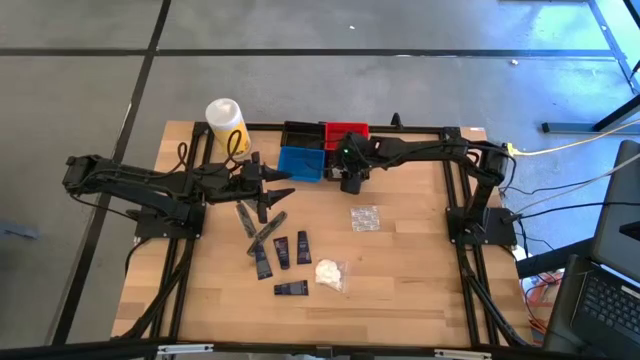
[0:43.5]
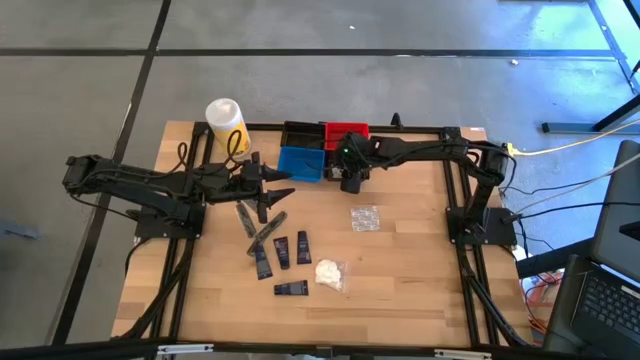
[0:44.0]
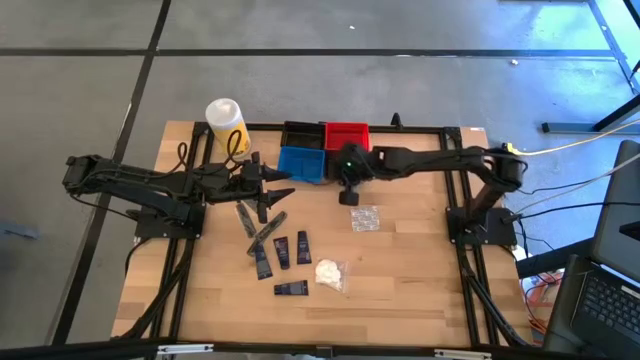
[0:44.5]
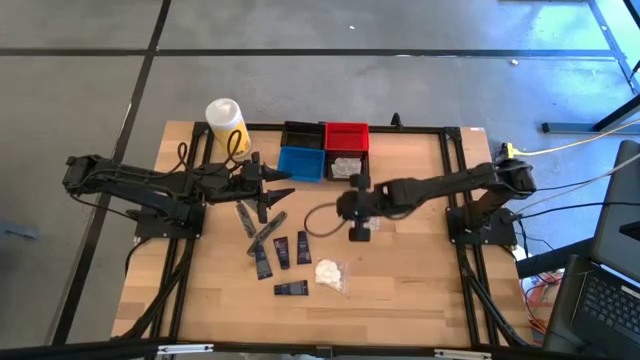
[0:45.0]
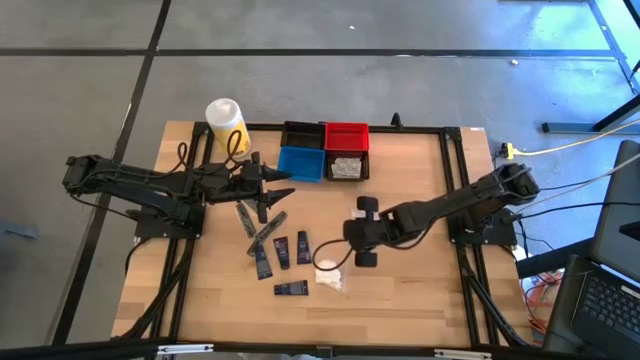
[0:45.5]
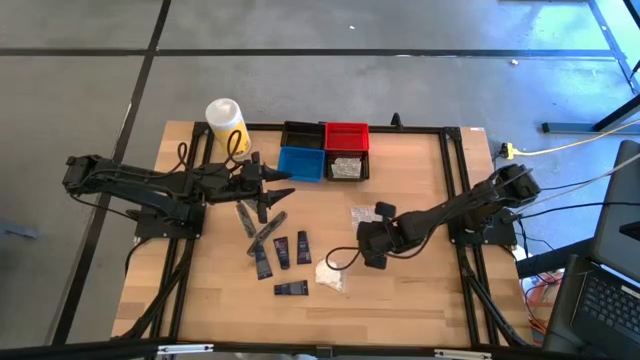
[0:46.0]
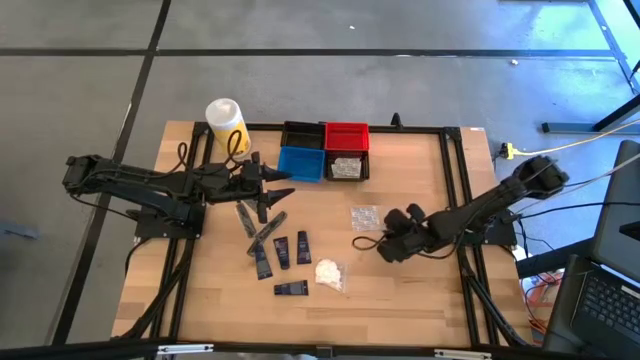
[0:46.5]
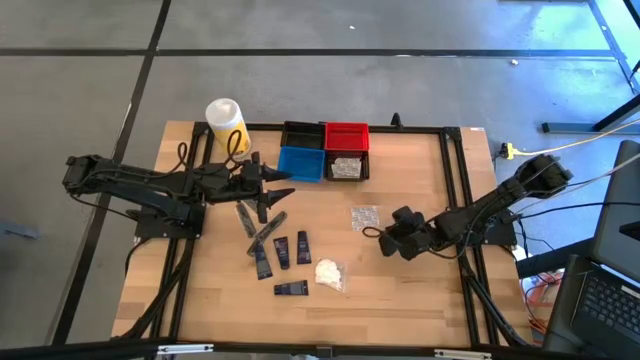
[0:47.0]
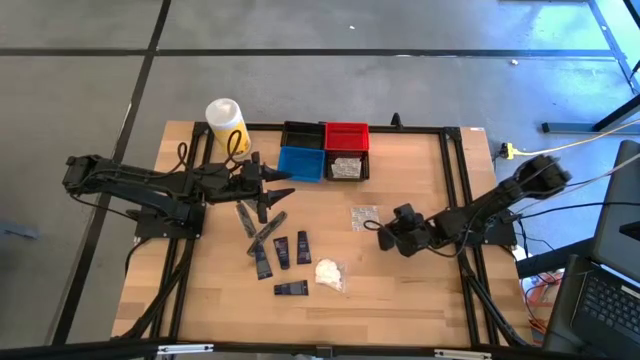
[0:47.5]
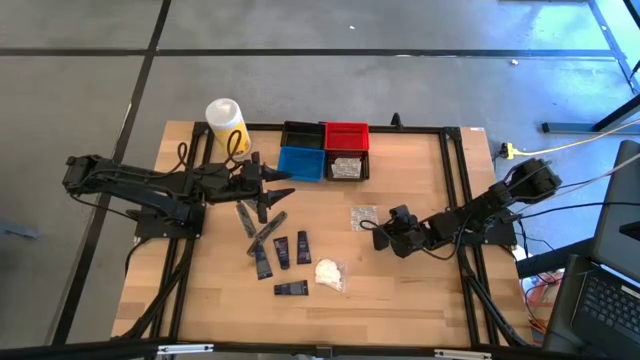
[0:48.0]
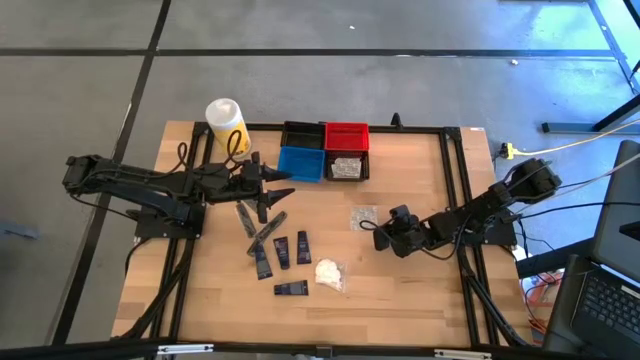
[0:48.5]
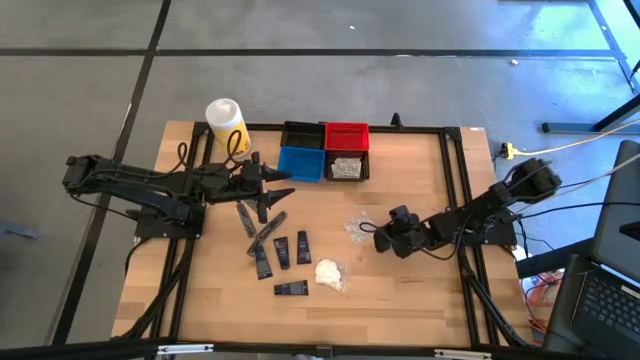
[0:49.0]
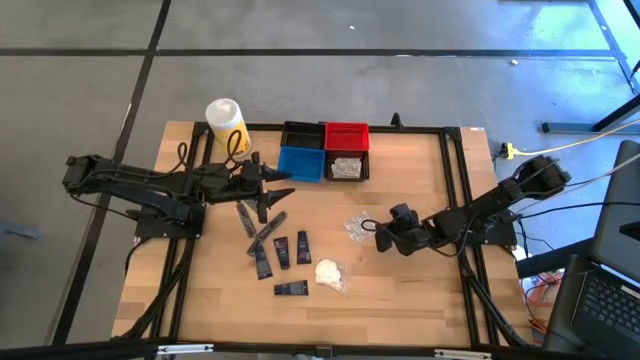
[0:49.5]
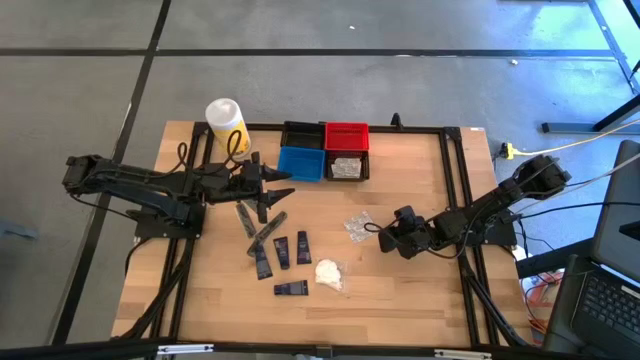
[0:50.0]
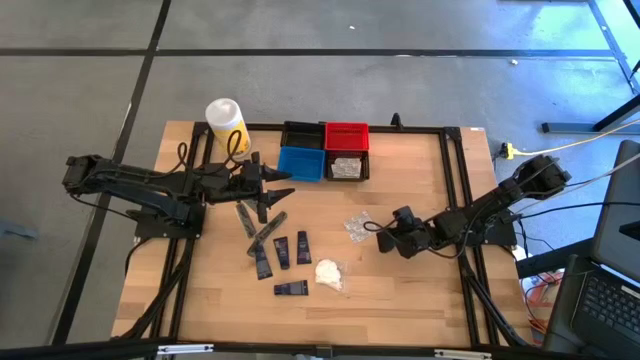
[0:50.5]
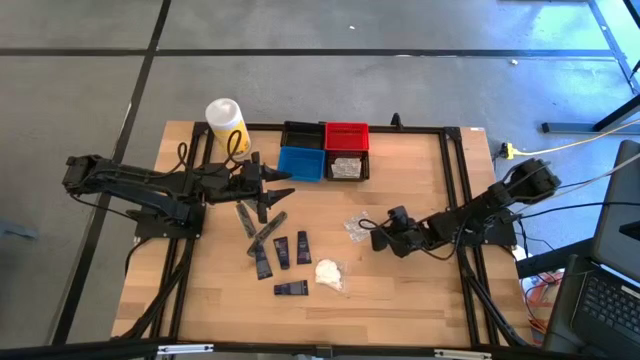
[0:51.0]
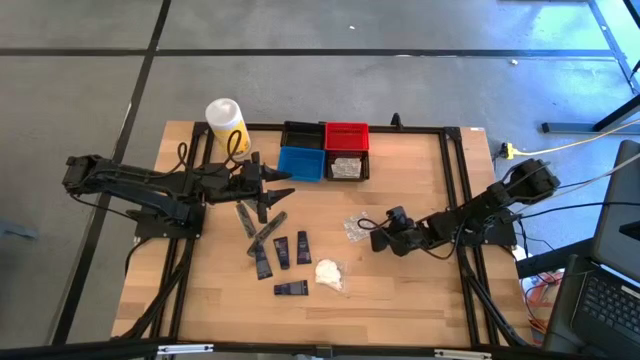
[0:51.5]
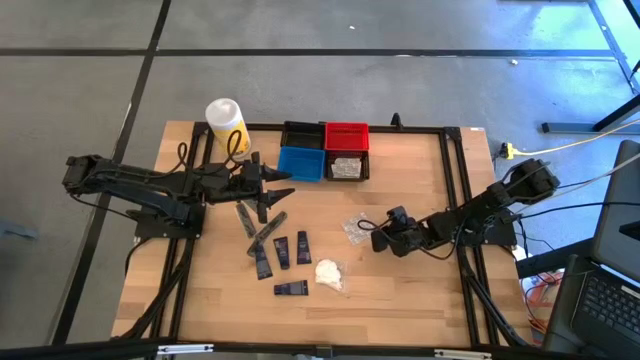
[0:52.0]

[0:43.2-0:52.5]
Task: Pick & Place Travel size toiletries
Put the bandage pack into the bottom black bin

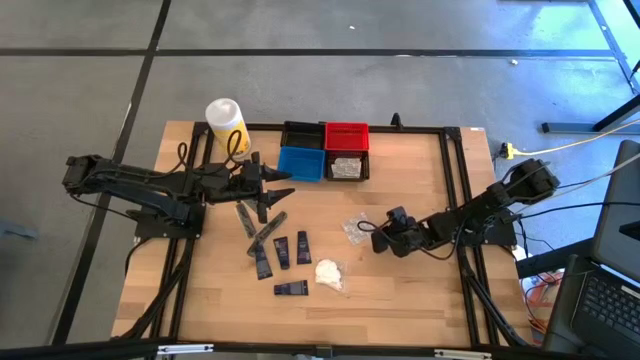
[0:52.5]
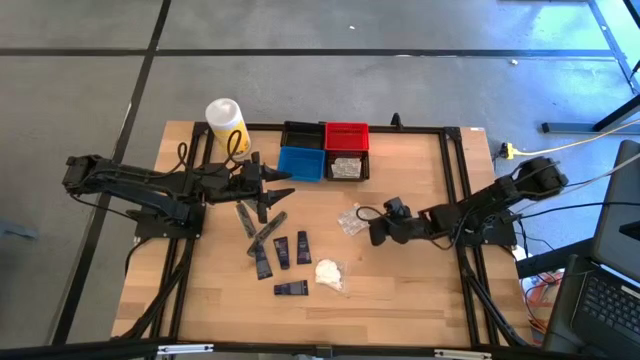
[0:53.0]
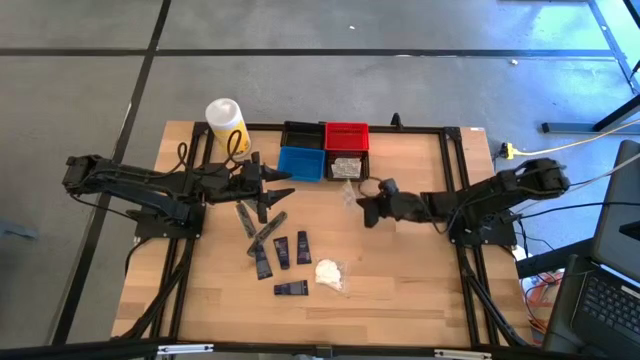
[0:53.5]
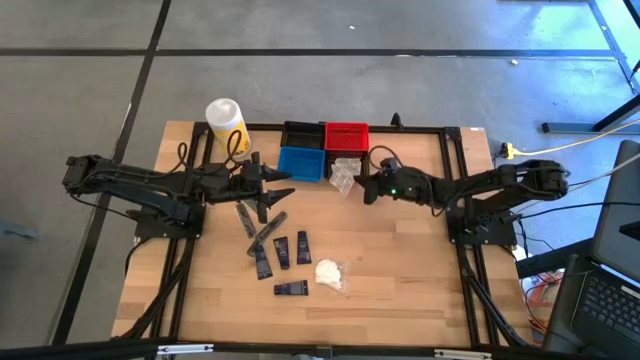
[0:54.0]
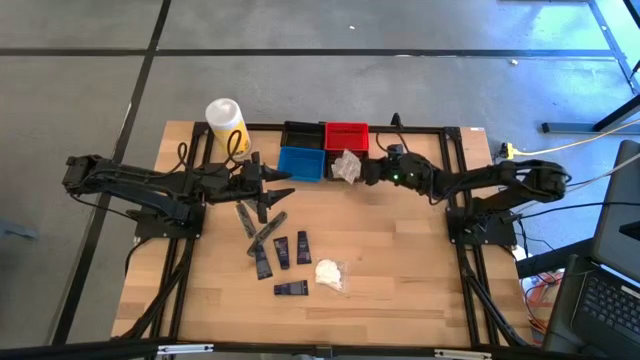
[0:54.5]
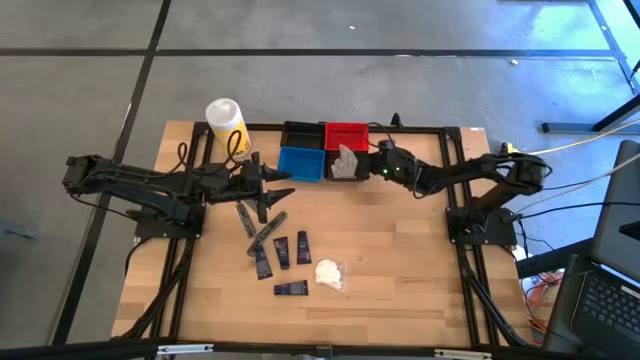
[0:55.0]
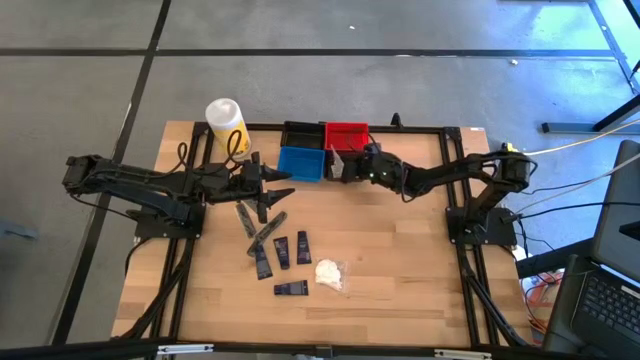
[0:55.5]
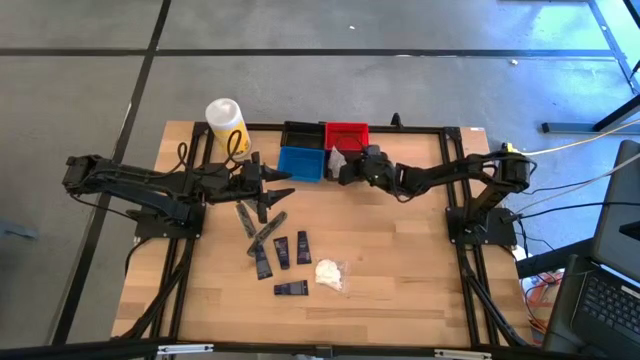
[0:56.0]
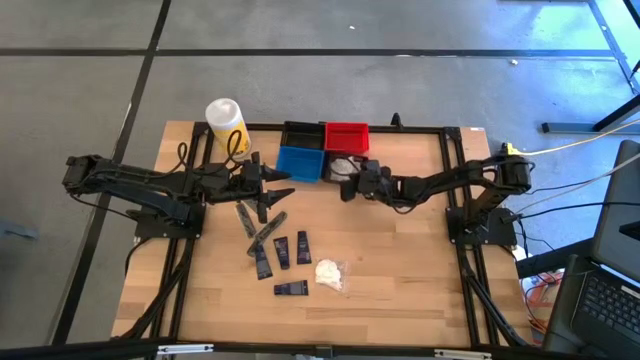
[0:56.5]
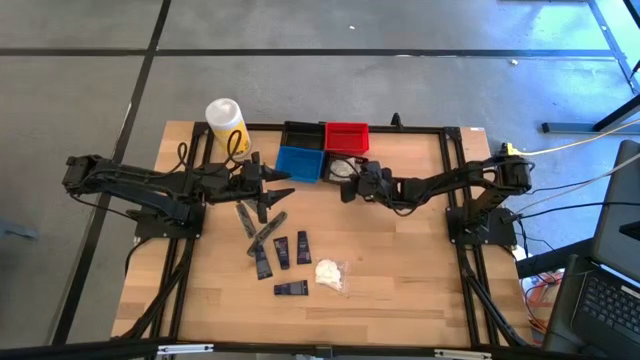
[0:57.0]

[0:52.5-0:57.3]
Put the bandage into the bottom black bin

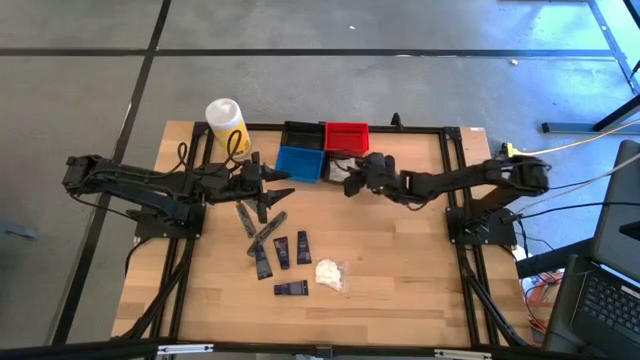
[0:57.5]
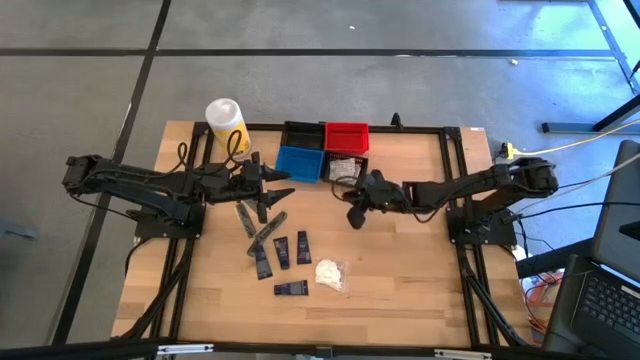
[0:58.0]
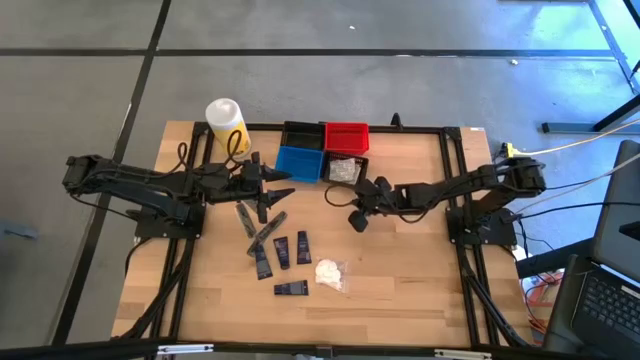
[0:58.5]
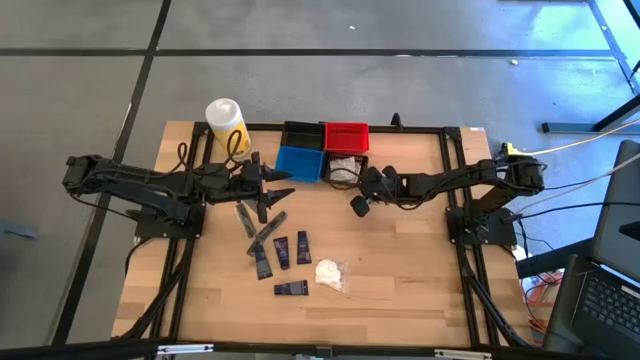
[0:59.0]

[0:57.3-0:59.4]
Adjust the bottom black bin on the table

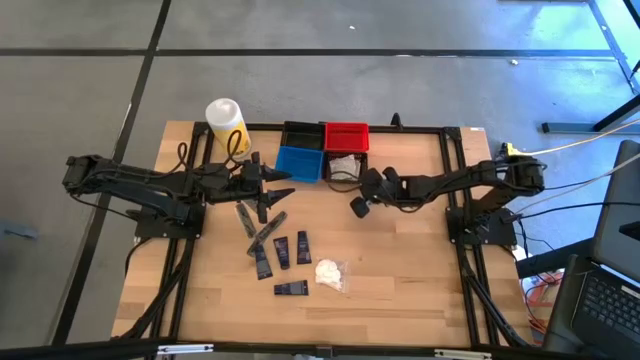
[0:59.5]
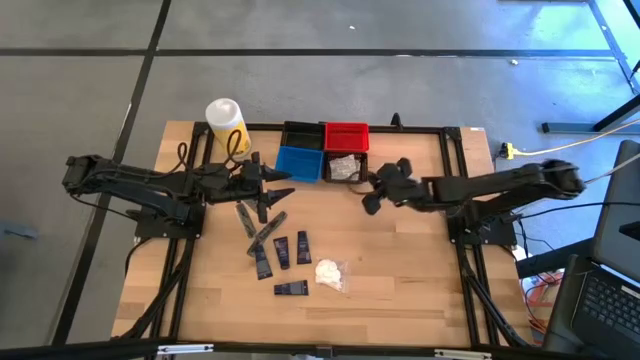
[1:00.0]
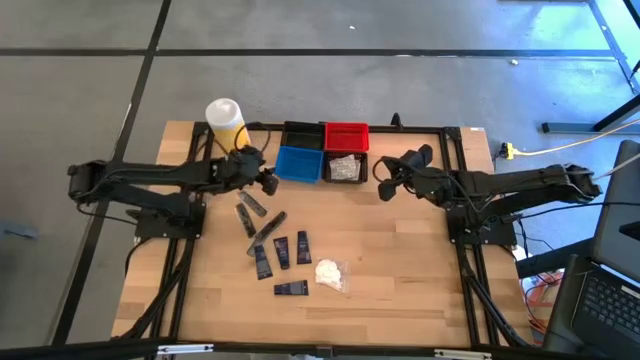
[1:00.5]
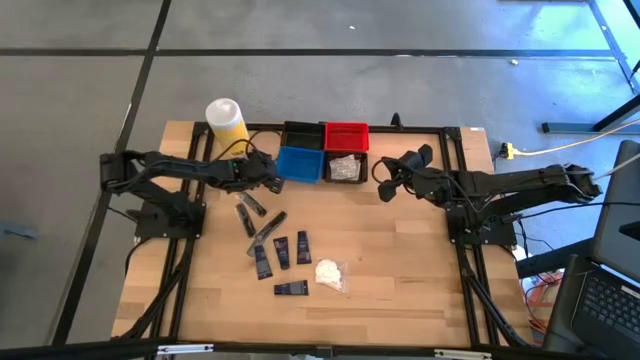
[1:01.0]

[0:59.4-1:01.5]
Adjust the blue bin on the table

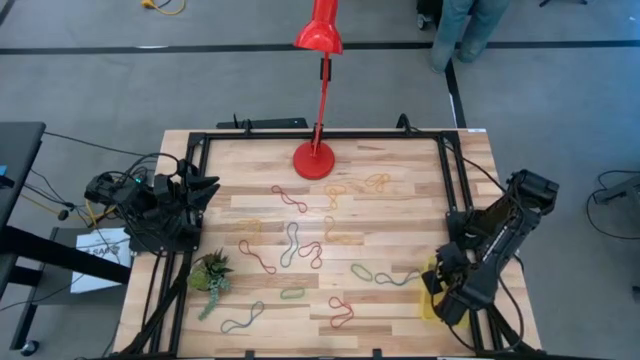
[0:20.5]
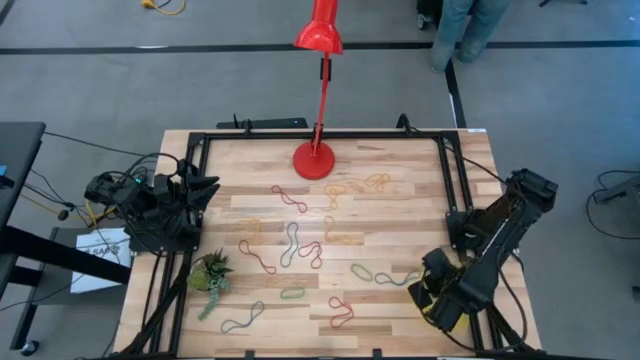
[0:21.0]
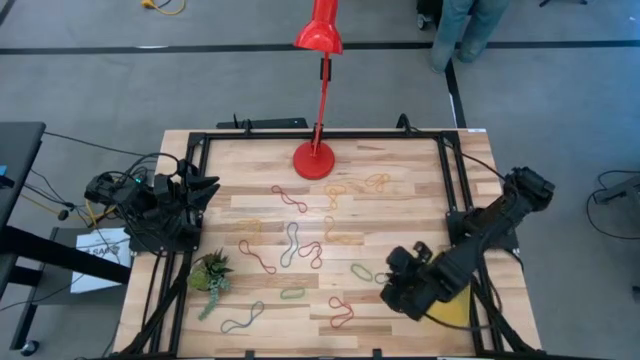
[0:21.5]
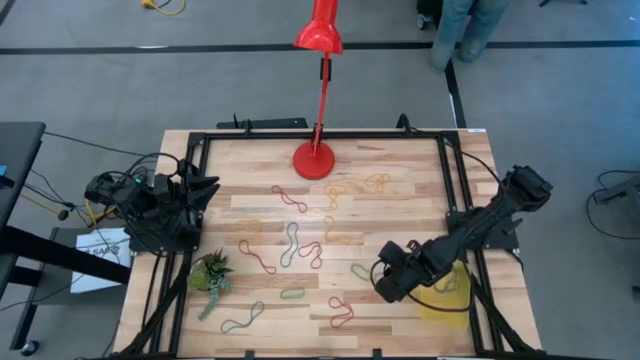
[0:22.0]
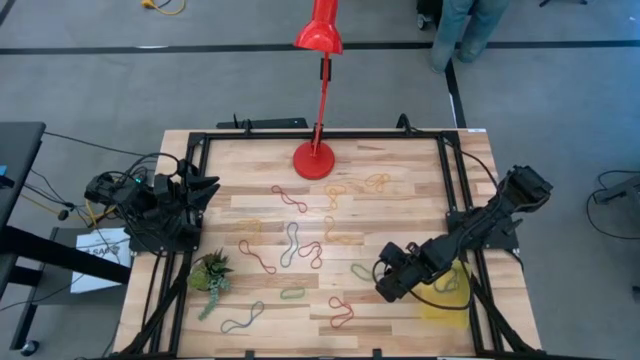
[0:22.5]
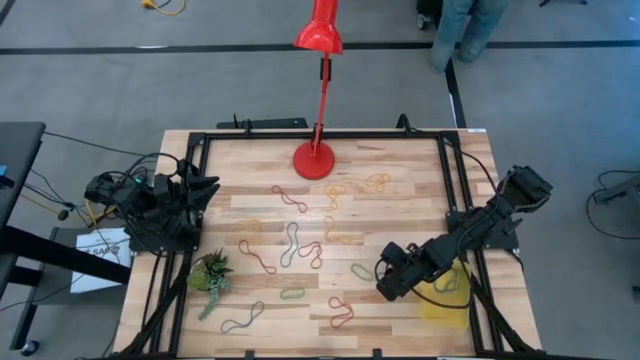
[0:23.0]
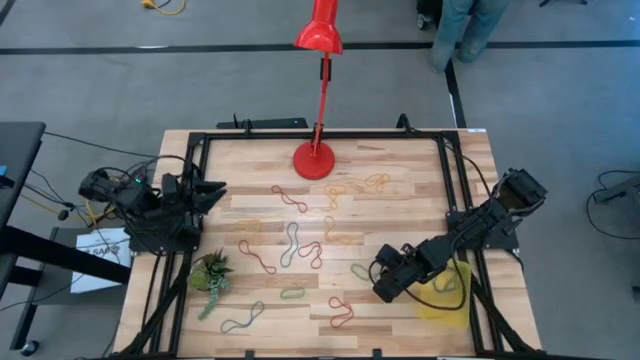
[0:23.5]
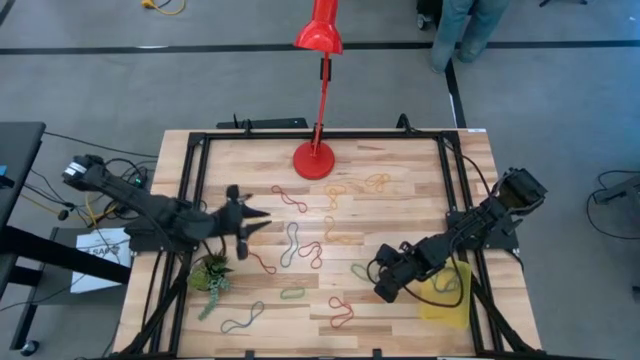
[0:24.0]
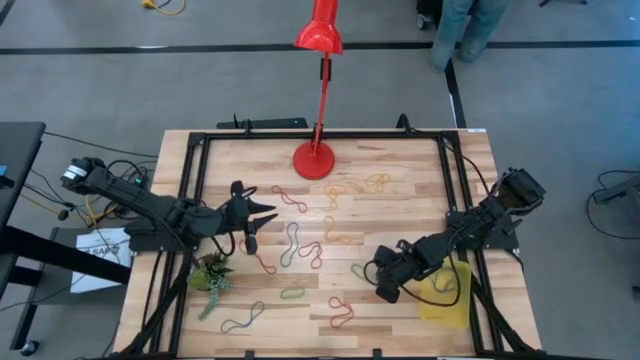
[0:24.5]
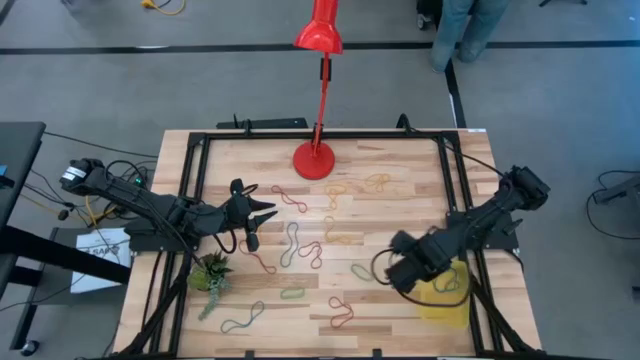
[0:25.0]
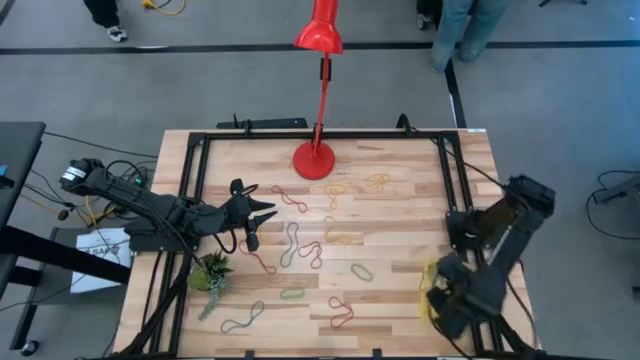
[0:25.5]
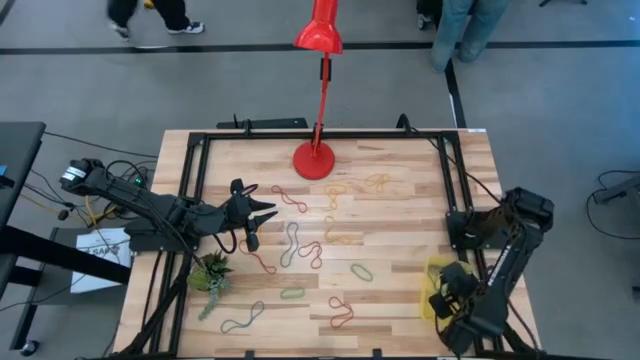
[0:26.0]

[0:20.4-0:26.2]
Task: Pick and place rubber bands into bin
Put the blue rubber band into the container
